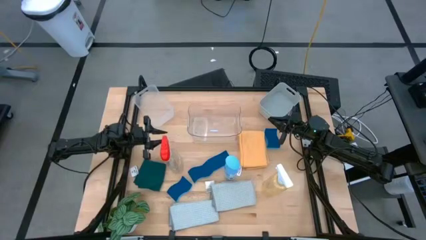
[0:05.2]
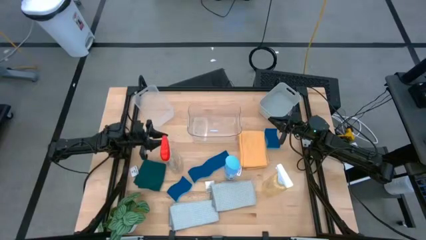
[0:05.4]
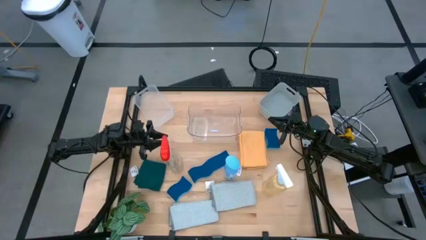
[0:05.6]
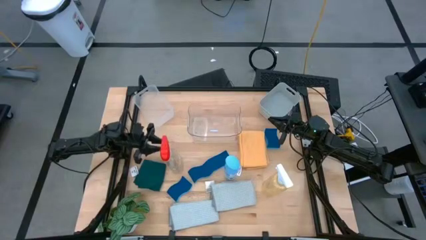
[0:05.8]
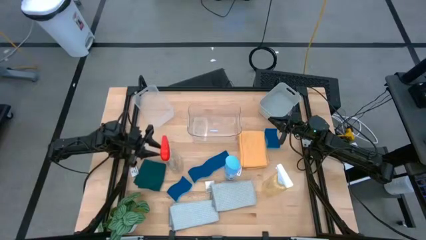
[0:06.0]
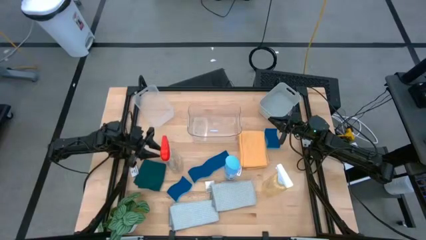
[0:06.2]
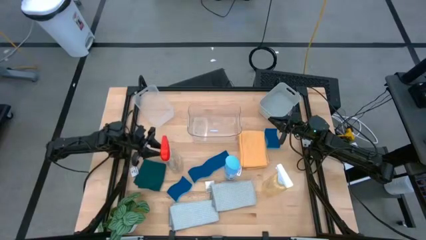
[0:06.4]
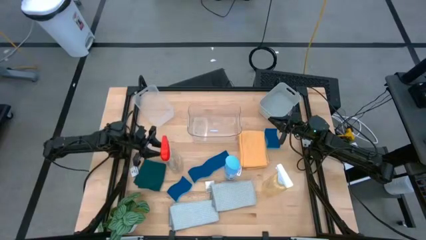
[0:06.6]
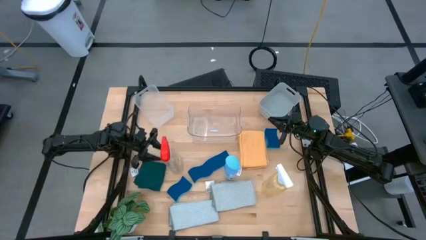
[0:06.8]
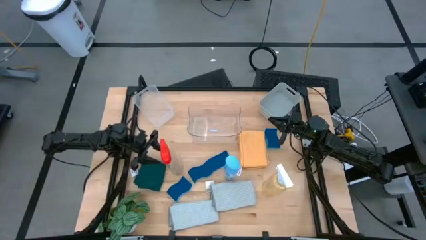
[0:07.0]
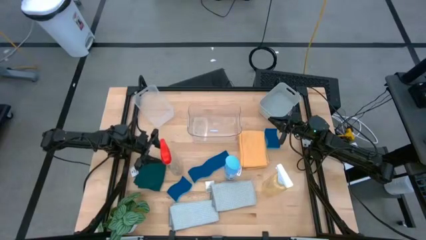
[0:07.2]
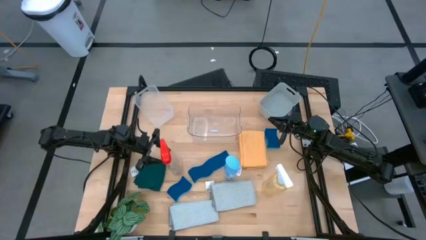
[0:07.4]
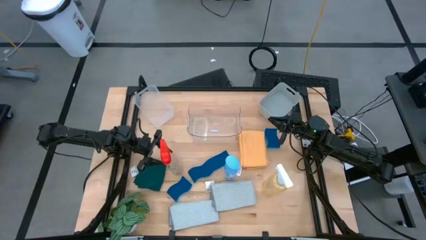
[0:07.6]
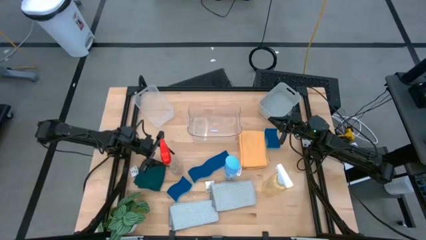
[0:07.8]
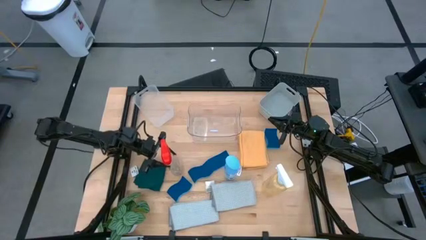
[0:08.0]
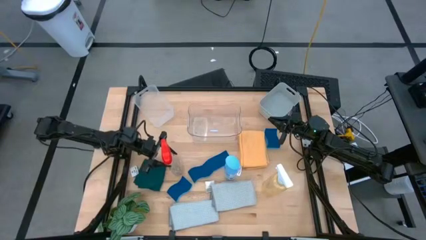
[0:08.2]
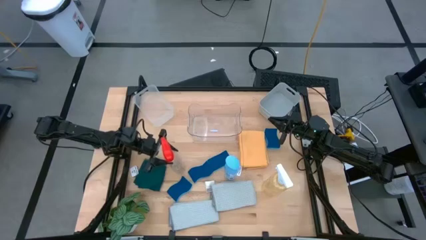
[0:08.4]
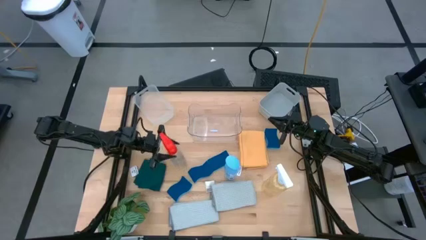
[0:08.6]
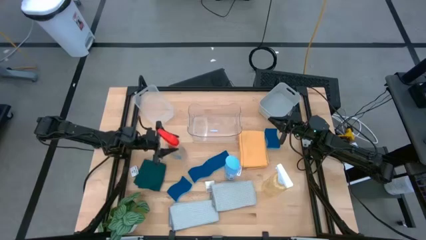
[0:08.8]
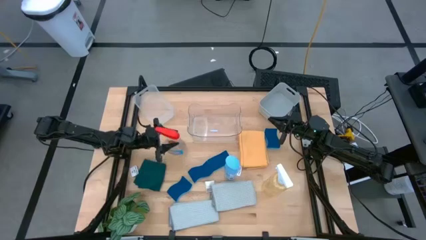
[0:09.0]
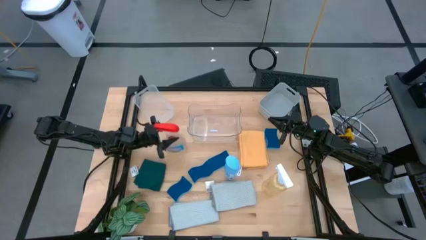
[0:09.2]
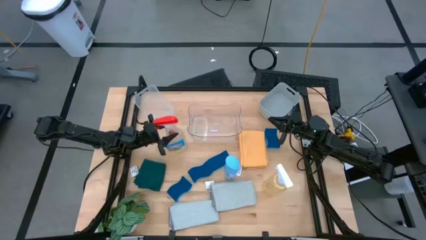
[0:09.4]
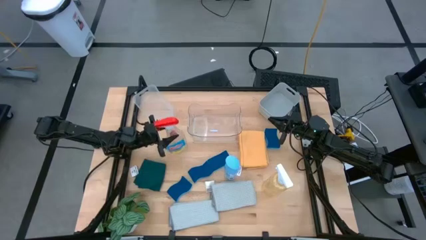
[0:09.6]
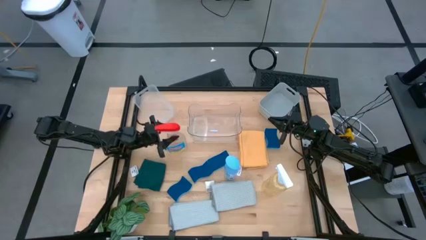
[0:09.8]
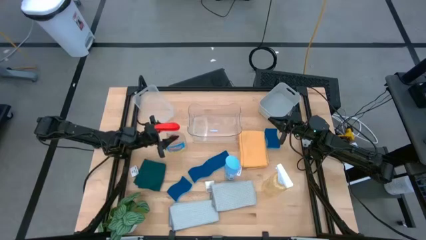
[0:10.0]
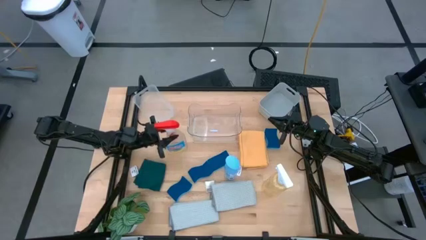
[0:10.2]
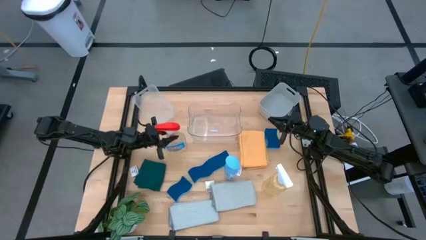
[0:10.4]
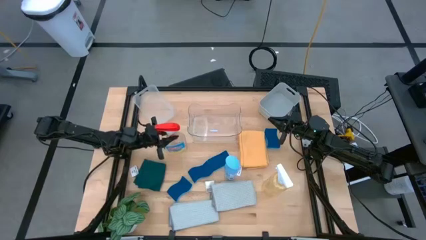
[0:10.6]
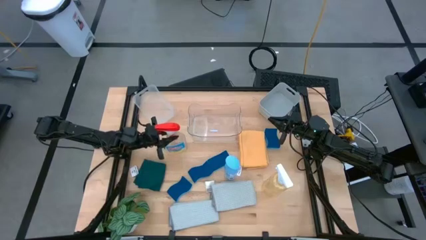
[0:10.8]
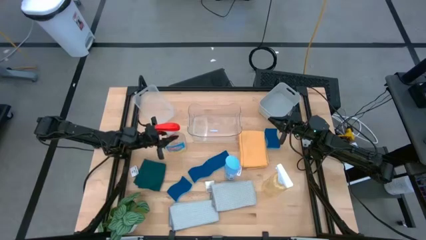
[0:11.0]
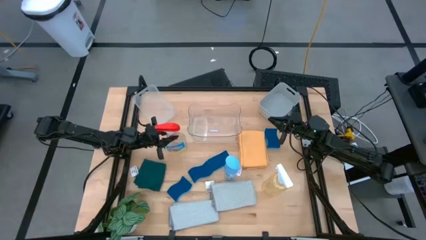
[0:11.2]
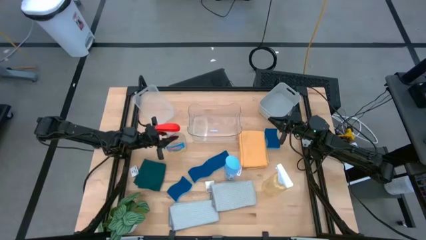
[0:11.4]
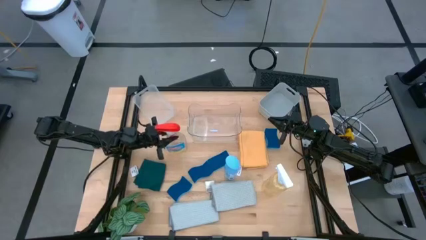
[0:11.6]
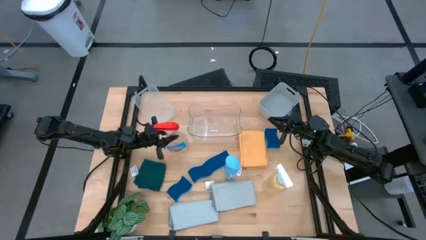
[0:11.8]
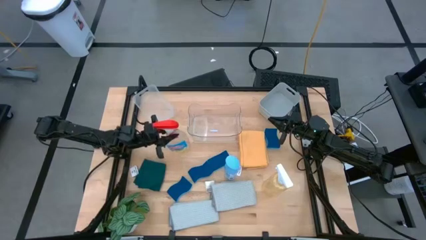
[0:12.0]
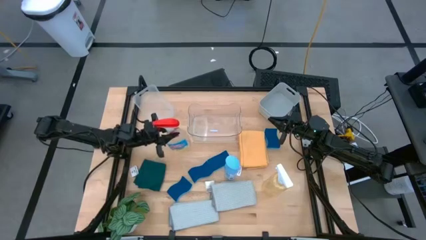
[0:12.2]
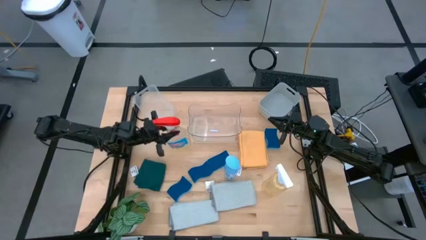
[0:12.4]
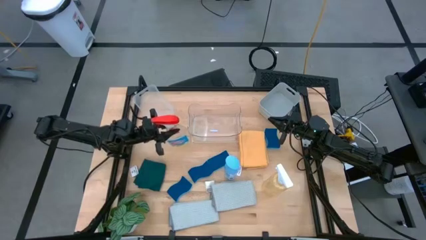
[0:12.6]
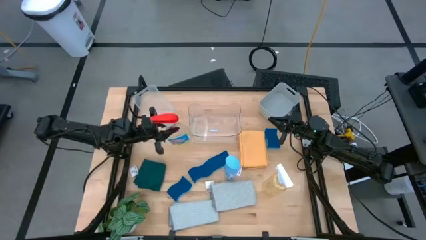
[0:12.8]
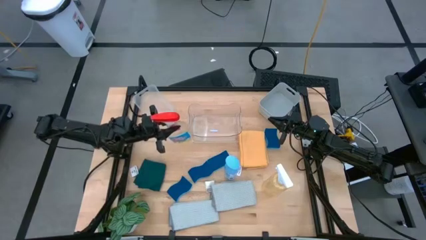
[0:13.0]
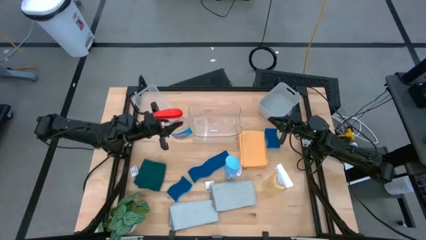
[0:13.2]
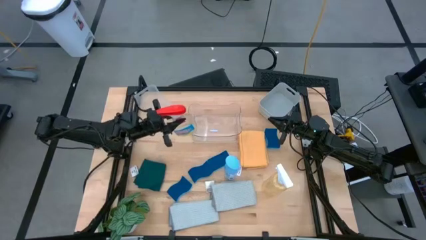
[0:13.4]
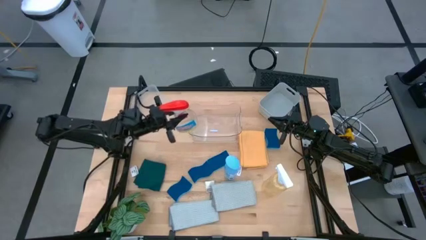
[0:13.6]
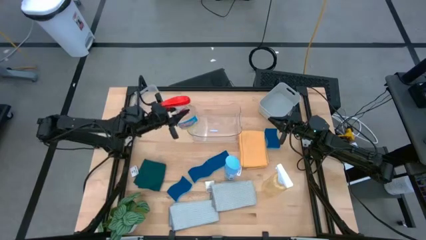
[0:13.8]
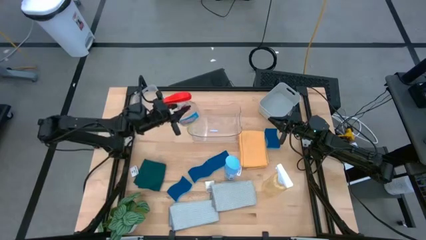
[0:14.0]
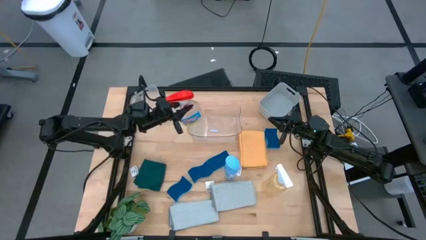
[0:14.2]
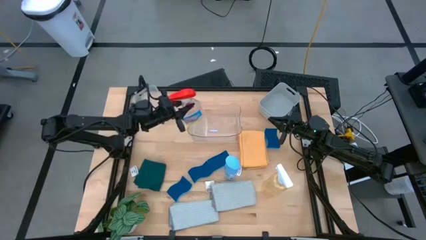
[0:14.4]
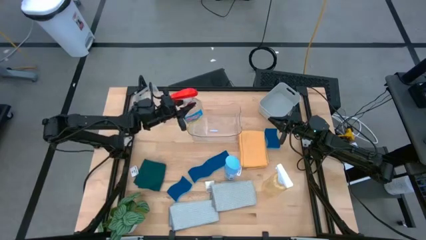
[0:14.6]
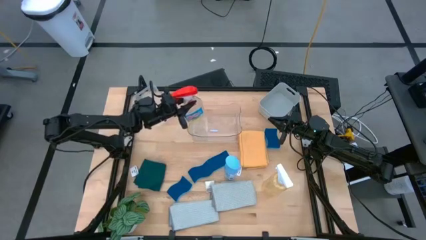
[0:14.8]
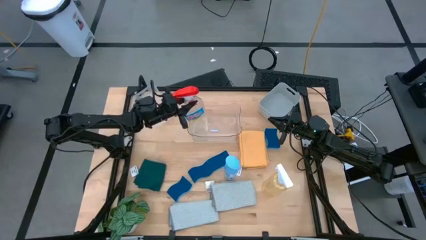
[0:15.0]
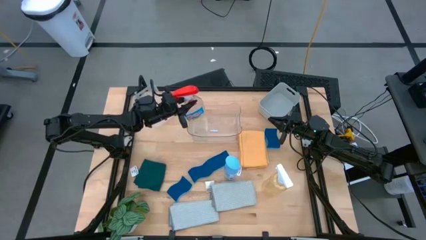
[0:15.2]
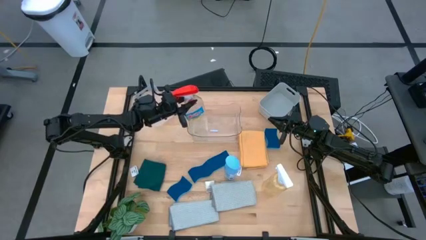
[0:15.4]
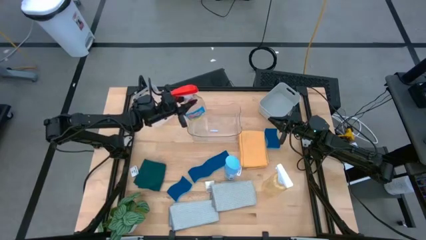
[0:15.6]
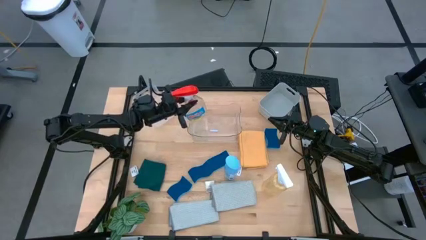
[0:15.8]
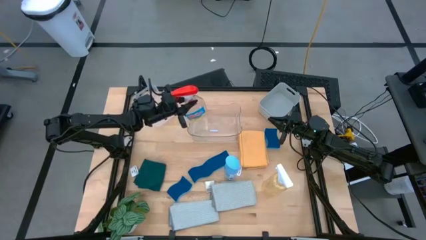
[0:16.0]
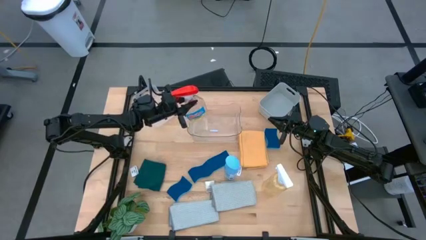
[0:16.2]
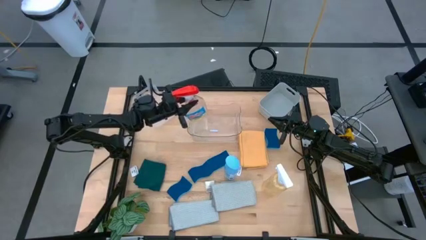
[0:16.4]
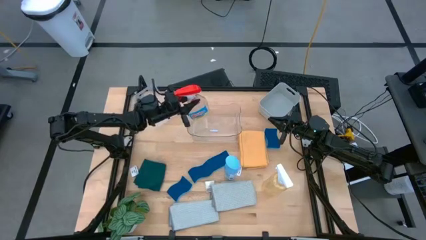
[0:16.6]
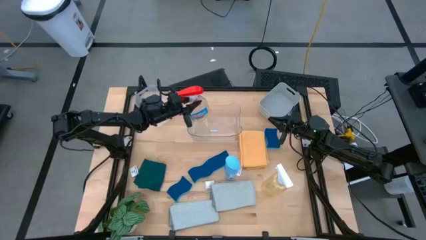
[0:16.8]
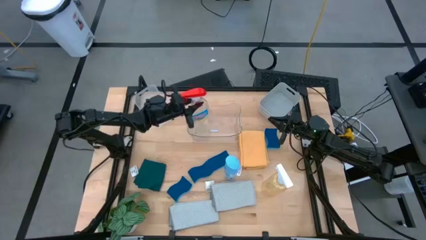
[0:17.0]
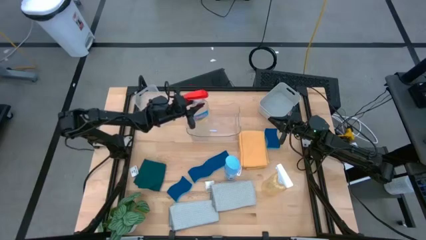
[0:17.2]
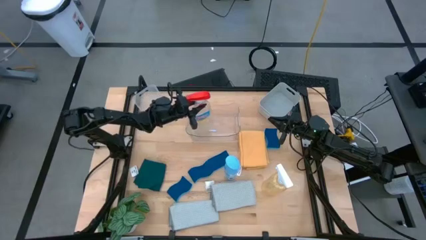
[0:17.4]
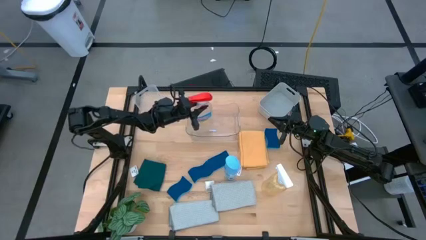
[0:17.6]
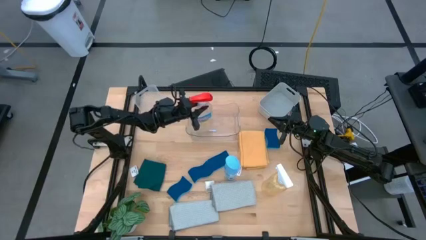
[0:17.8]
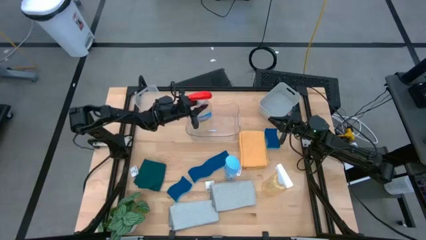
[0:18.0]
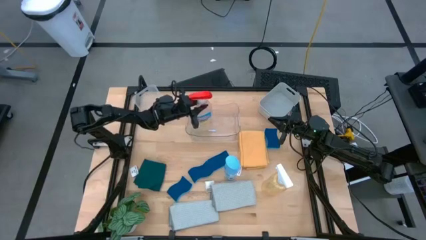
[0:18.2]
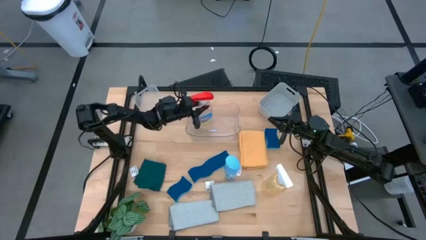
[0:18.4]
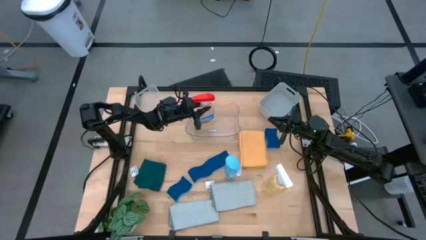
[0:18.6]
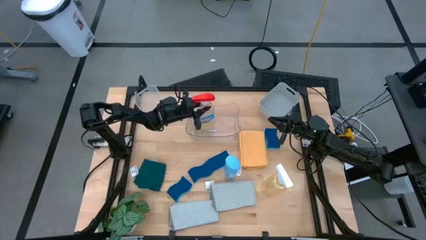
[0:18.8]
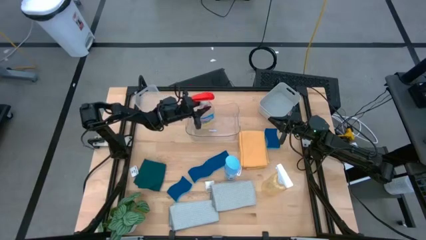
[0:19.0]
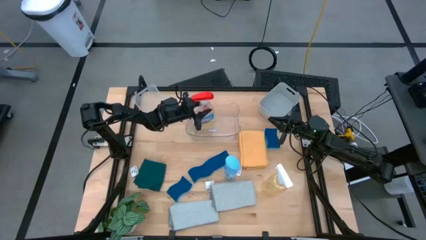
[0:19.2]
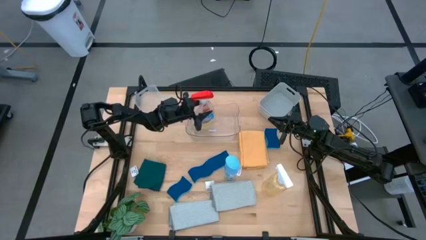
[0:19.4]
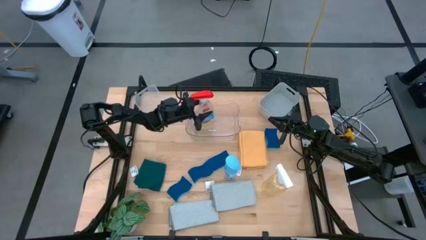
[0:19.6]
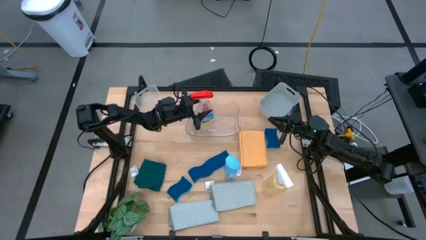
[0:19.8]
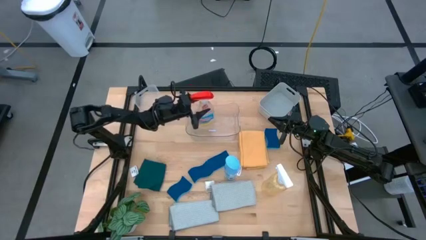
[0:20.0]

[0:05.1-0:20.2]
Task: Pick & Place Kitchen Items
Put the red sprayer bottle into the transparent bin
